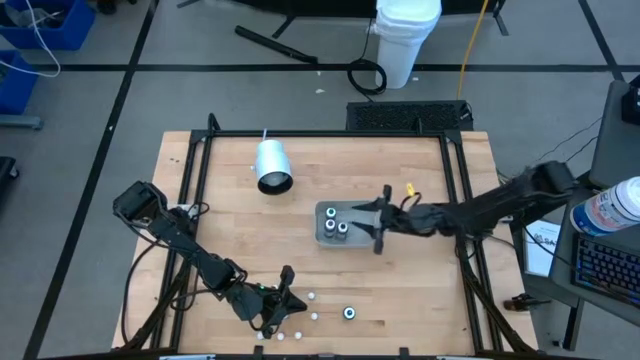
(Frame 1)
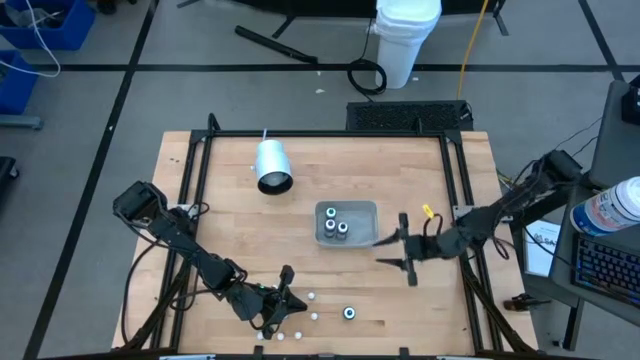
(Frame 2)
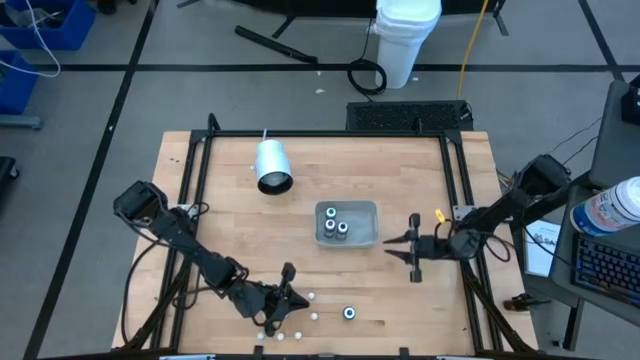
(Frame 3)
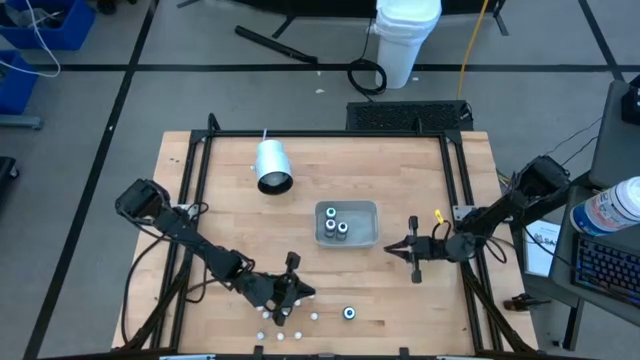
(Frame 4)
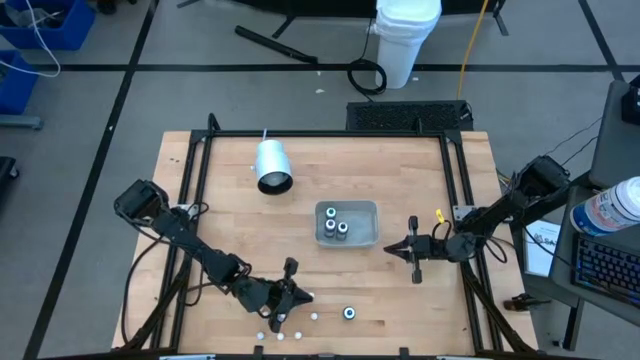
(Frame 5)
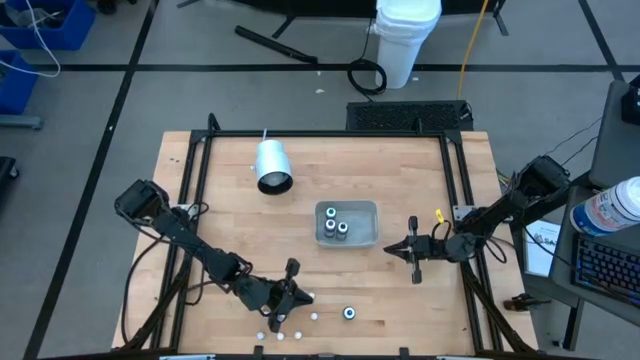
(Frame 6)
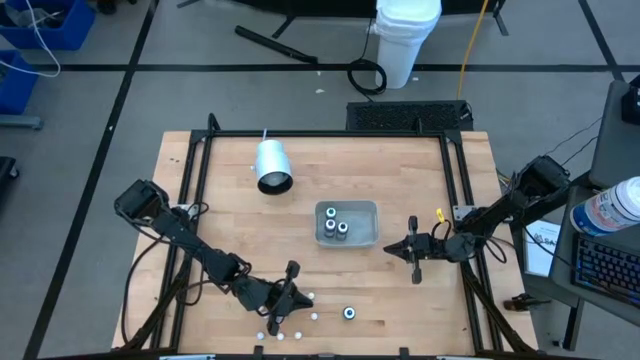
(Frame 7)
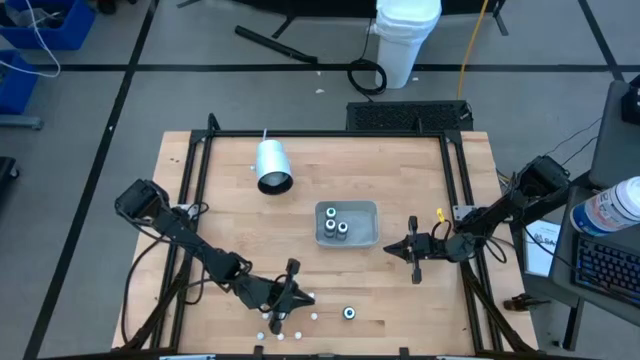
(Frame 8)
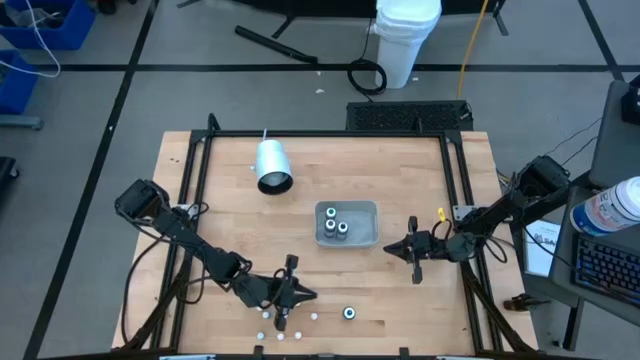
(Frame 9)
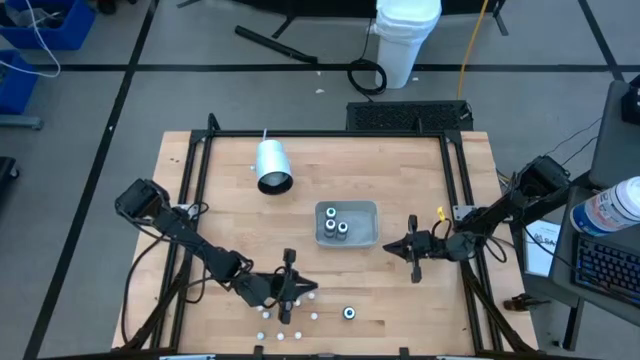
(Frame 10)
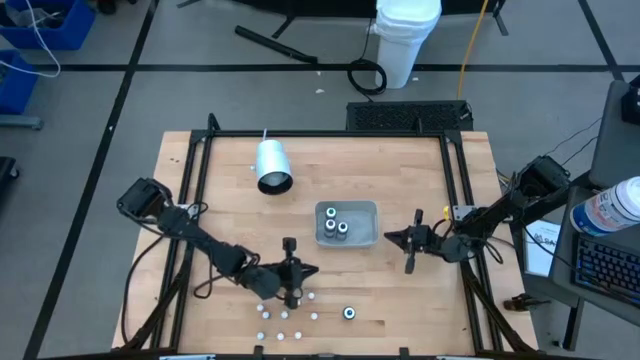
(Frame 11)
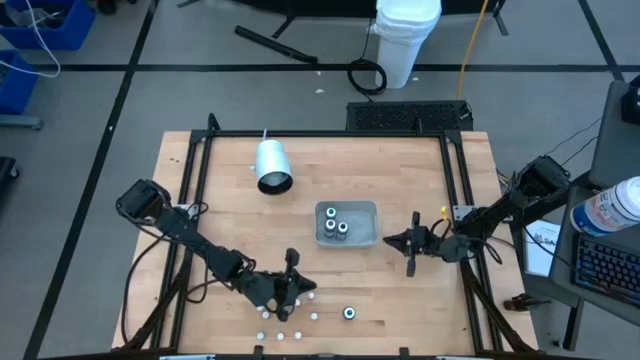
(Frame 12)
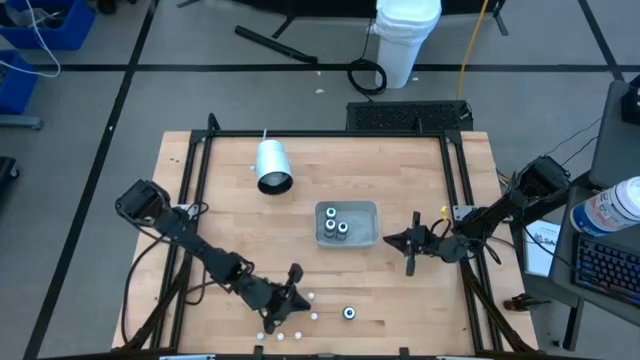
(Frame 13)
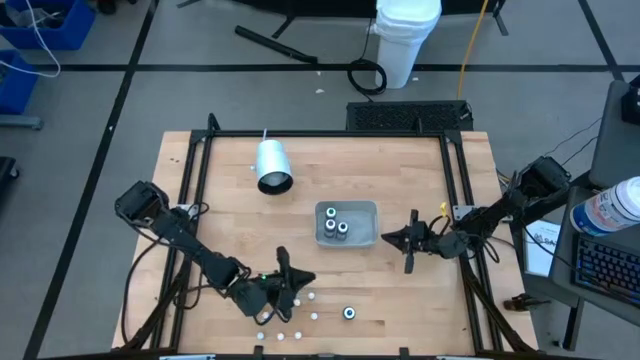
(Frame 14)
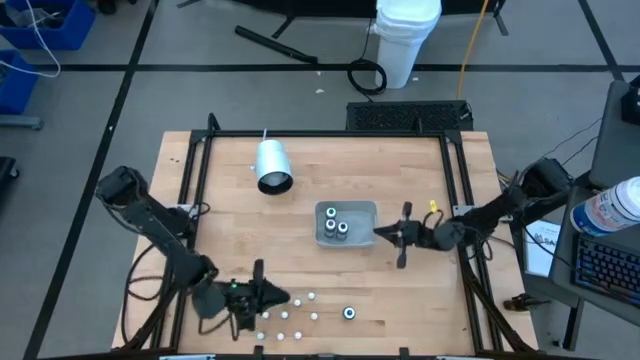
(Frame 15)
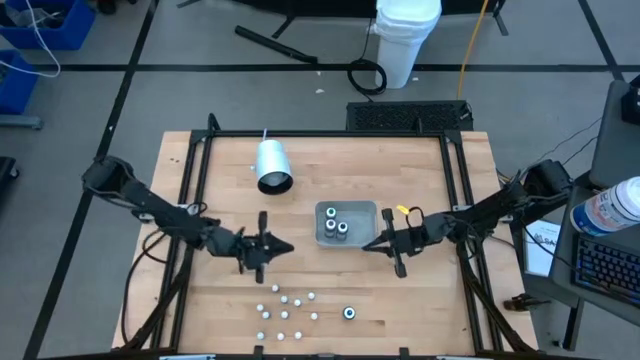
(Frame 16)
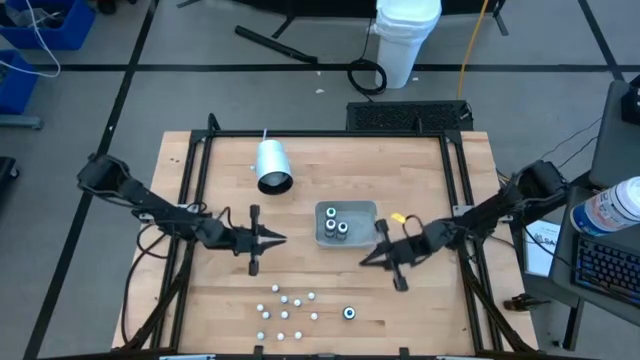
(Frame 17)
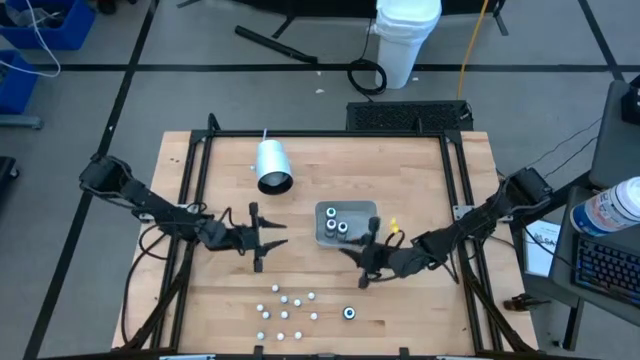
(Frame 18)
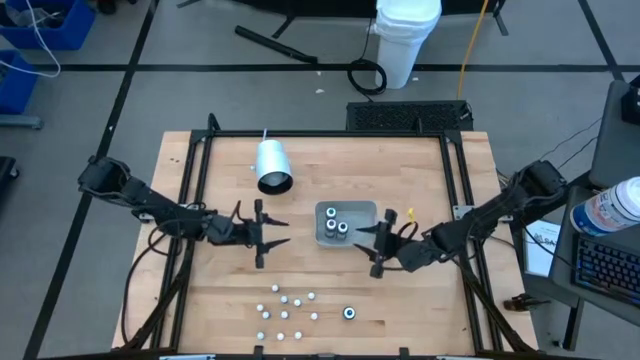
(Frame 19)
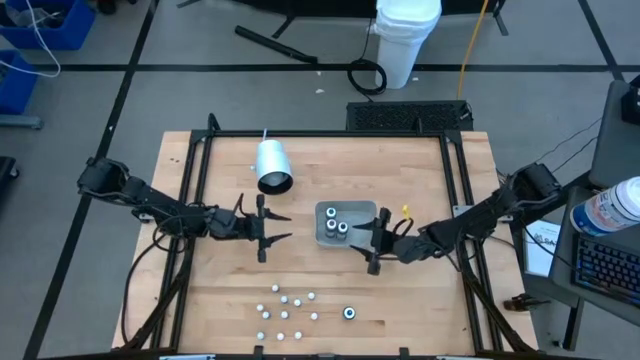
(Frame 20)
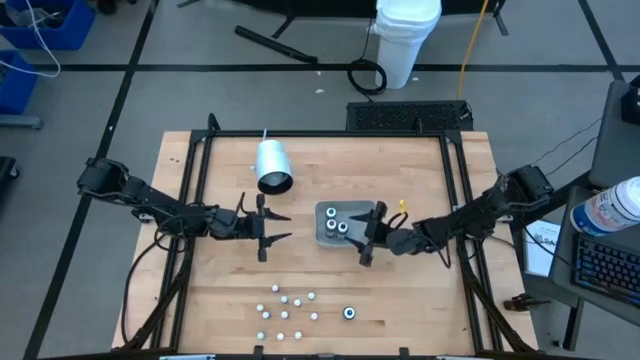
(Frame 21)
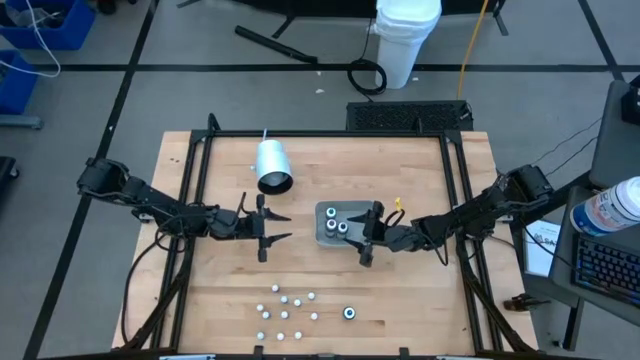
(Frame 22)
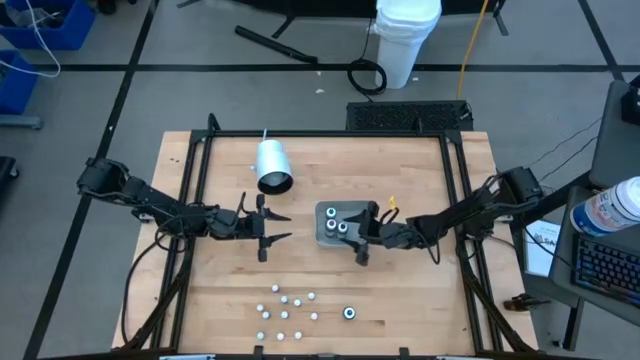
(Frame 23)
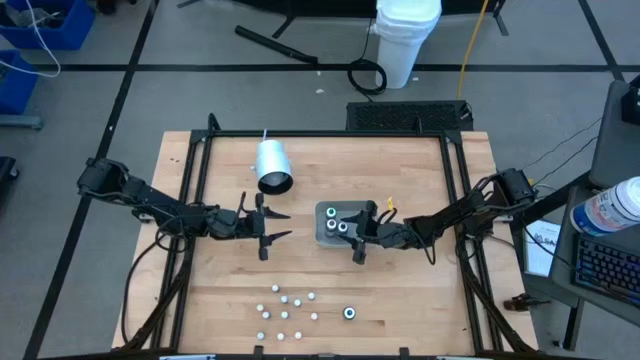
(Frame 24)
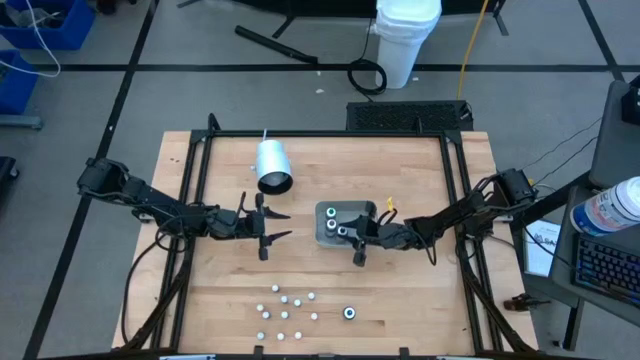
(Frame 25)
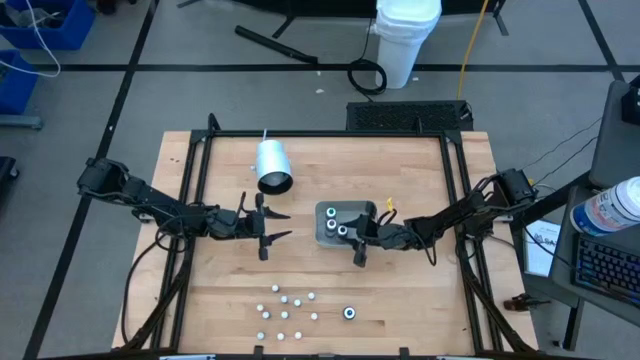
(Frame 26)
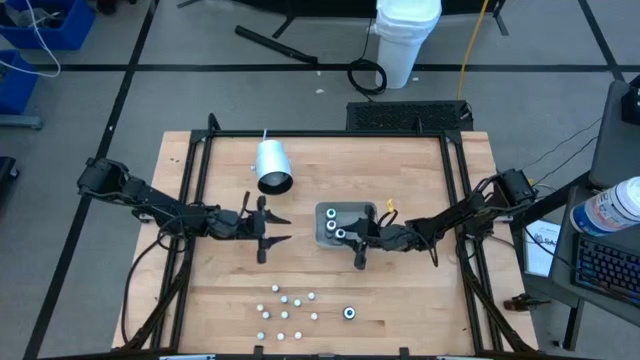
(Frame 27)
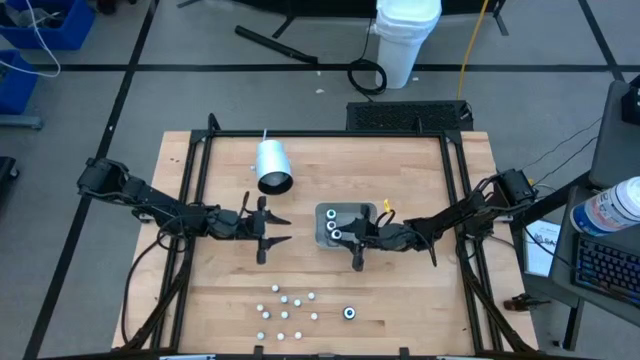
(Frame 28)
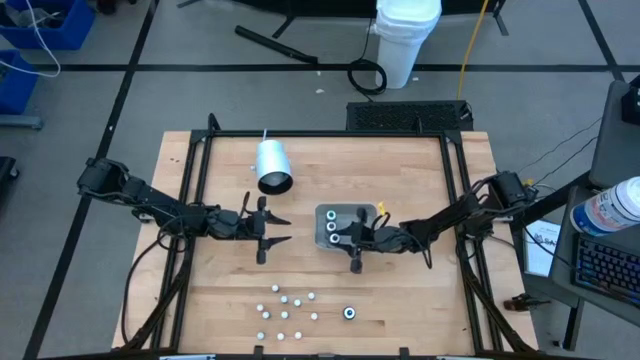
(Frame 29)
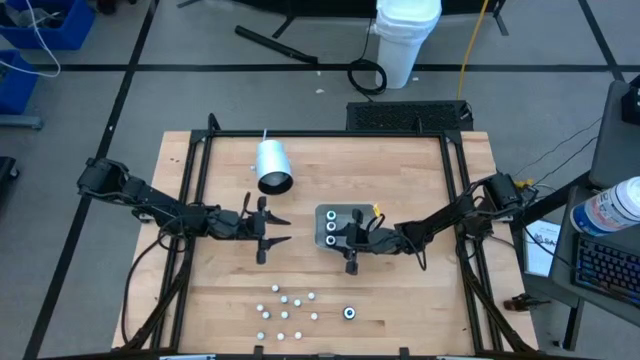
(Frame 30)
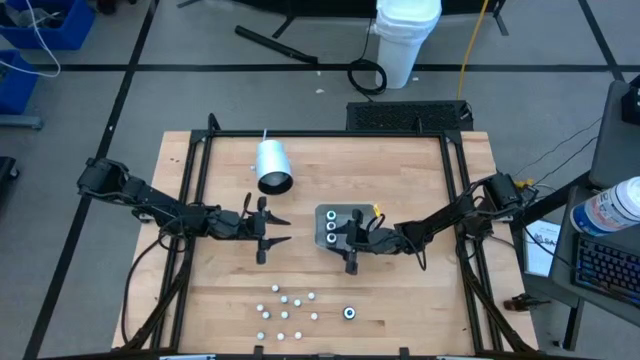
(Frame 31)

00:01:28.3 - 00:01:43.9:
Task: Pick & Place food coloring
Put the large black food coloring bottle into the white bin

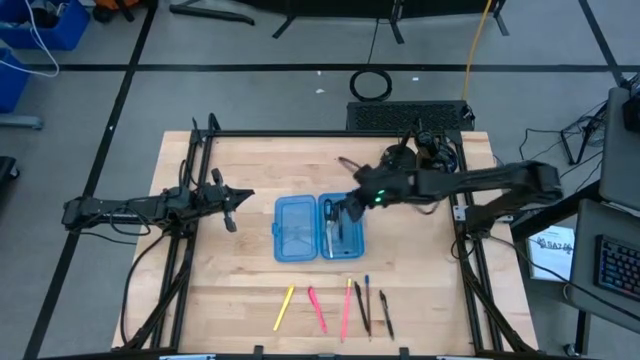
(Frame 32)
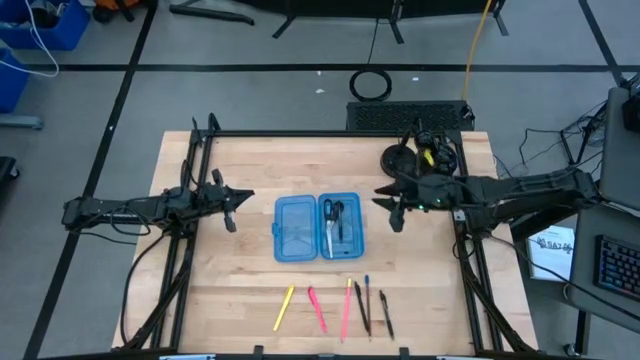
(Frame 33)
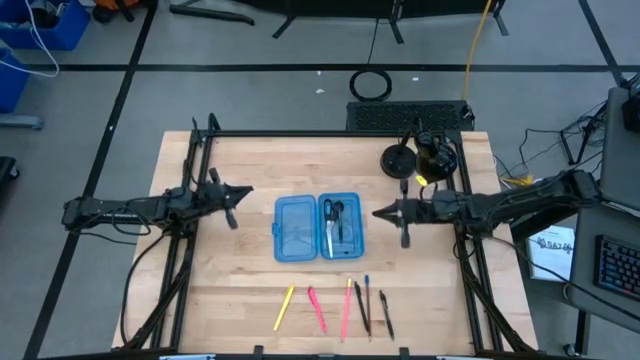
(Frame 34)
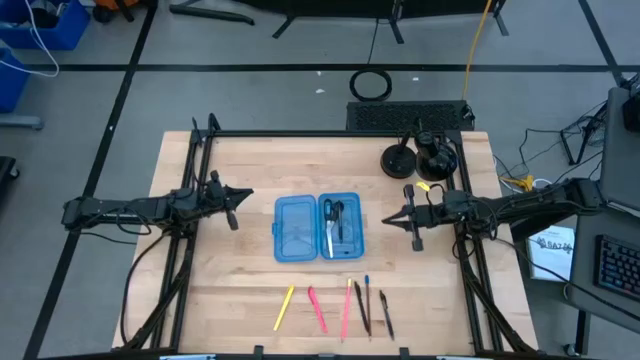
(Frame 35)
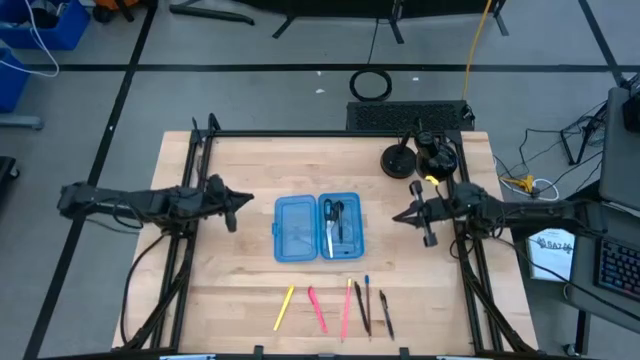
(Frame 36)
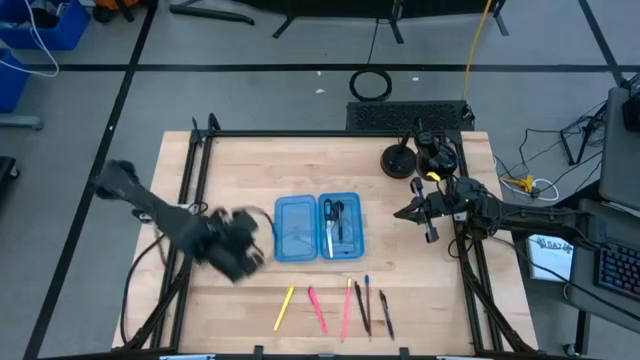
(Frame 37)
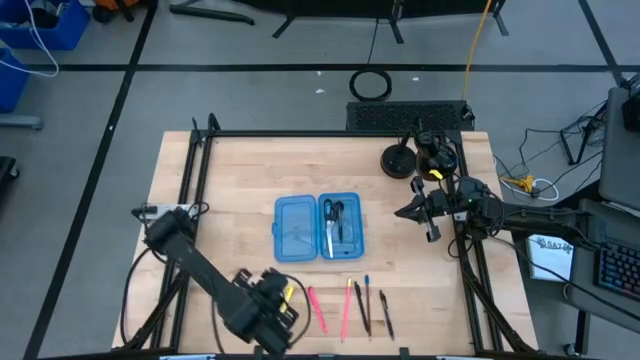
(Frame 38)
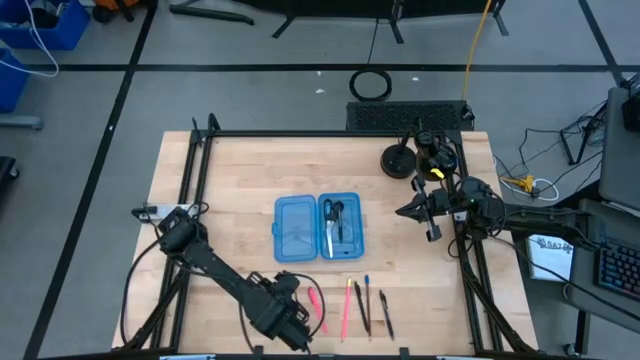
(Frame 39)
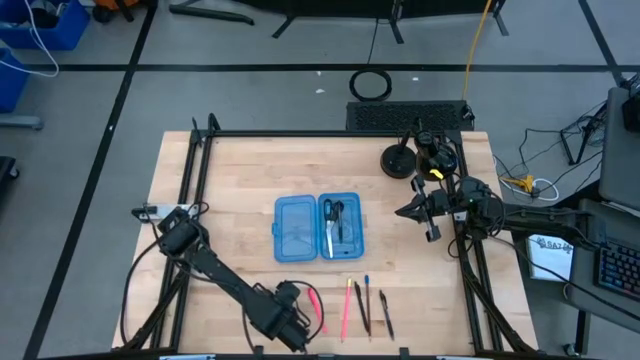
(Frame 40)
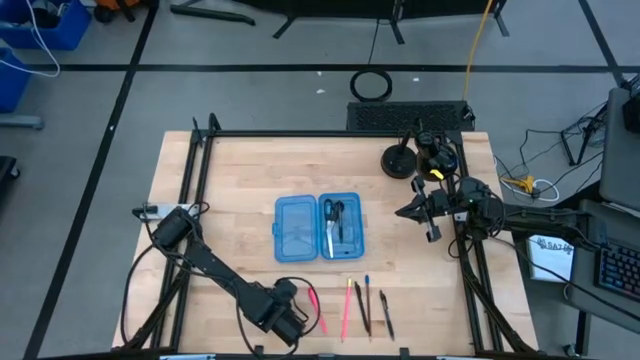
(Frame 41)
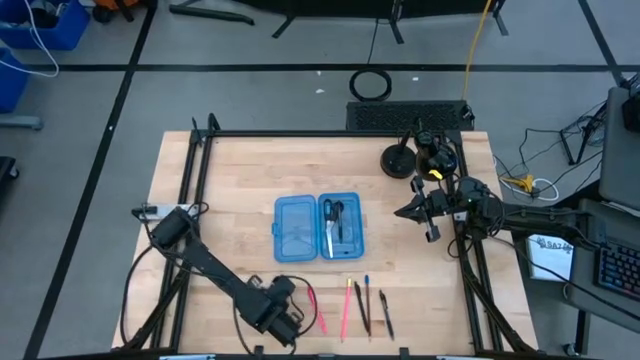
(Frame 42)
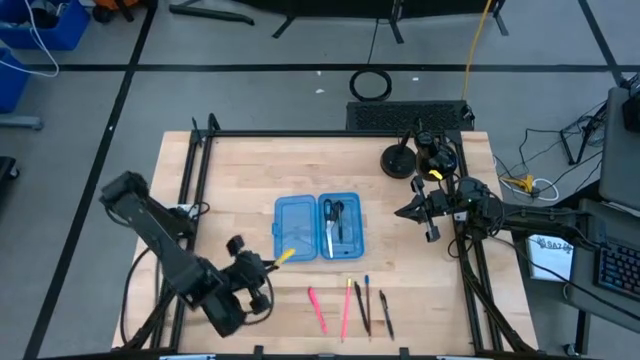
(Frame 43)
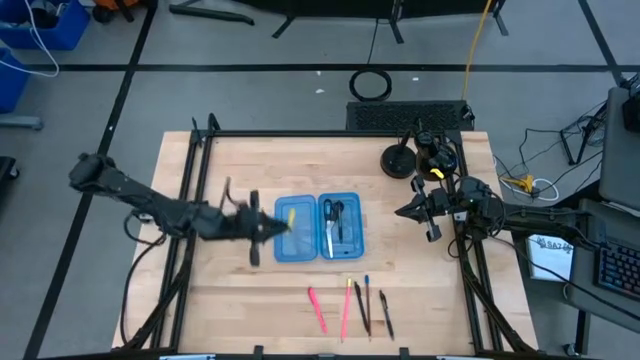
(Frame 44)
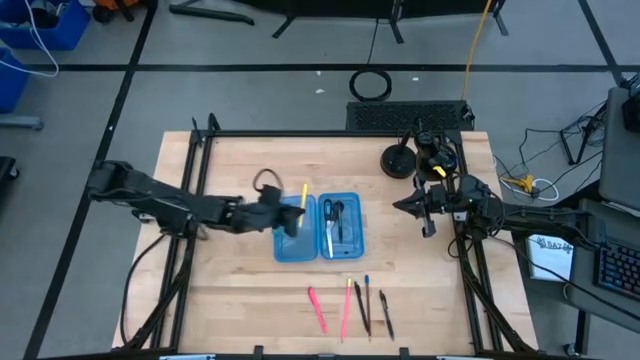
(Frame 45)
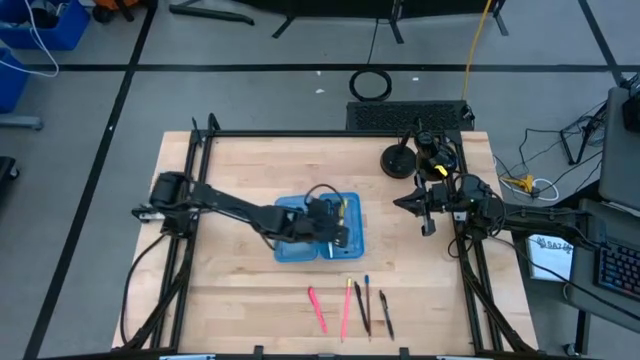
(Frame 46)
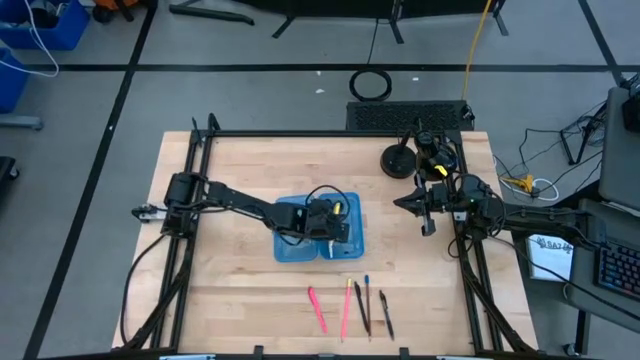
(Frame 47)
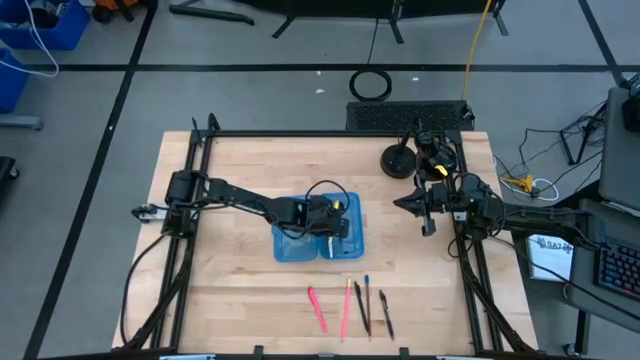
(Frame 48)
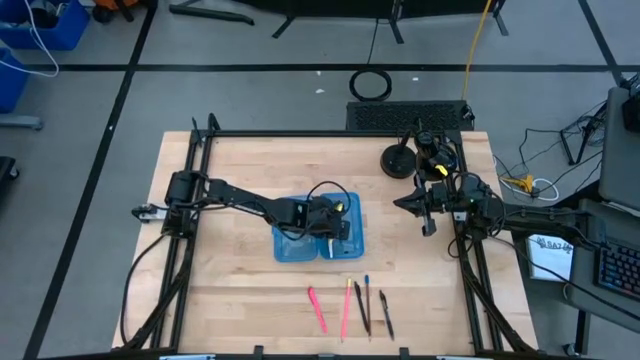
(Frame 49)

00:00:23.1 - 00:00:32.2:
Task: Pick & place school supplies into a supply box
Put the yellow pen into the blue supply box
